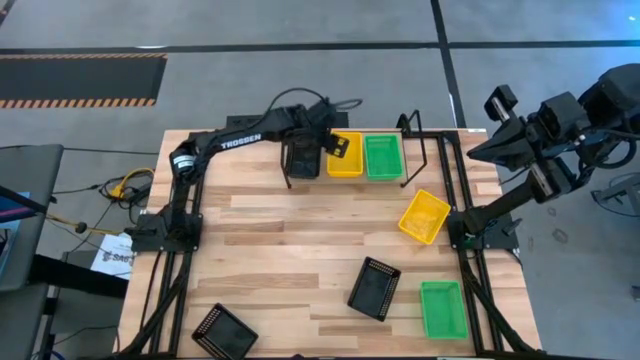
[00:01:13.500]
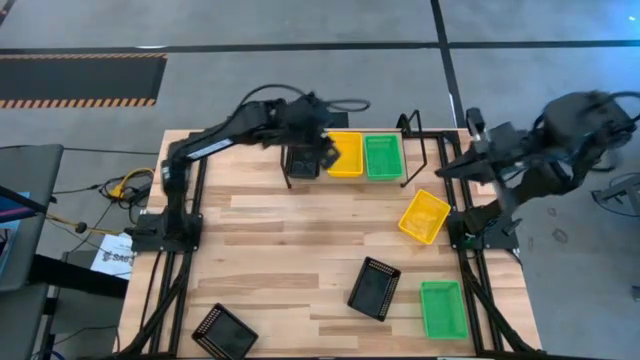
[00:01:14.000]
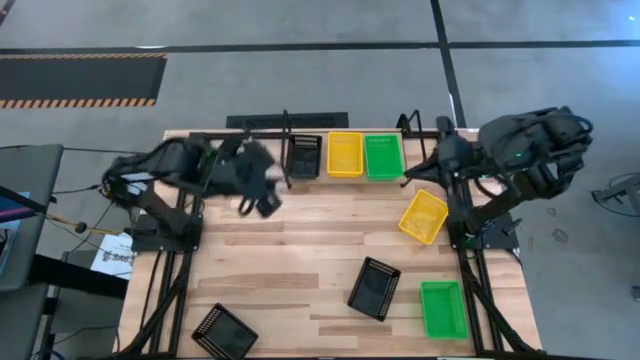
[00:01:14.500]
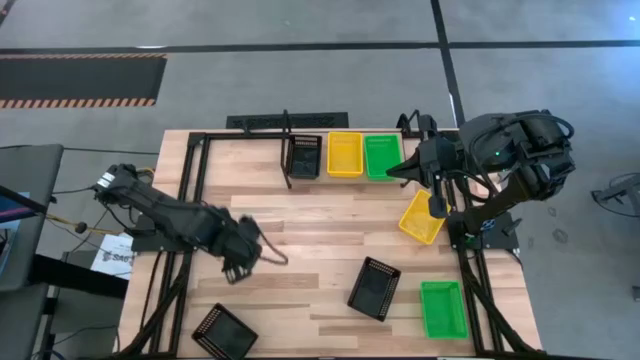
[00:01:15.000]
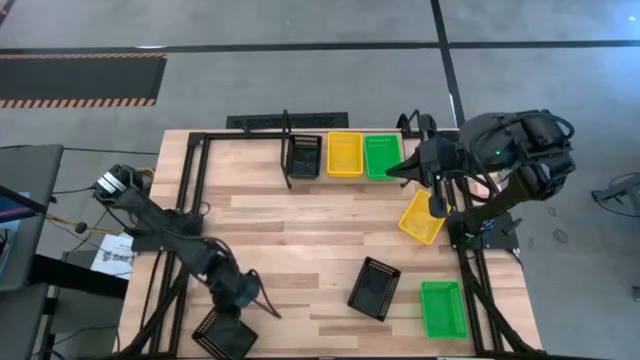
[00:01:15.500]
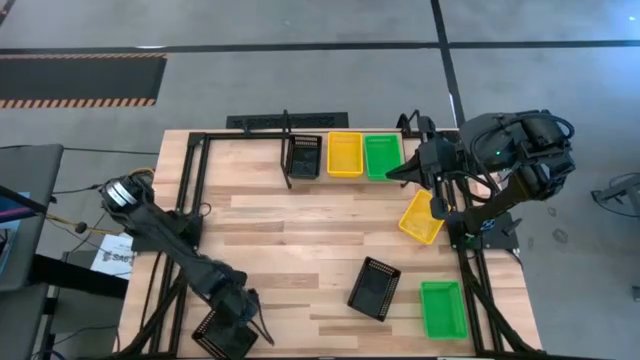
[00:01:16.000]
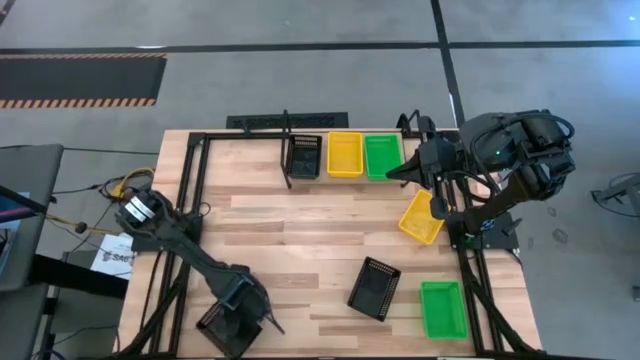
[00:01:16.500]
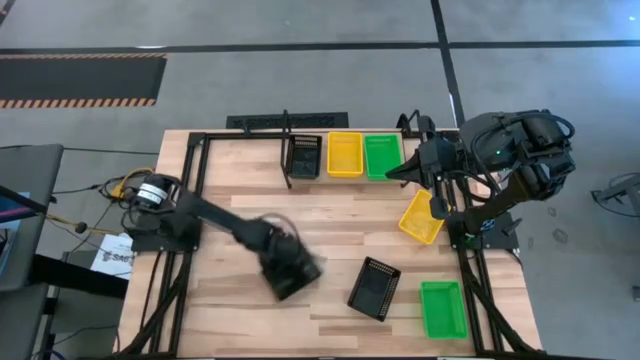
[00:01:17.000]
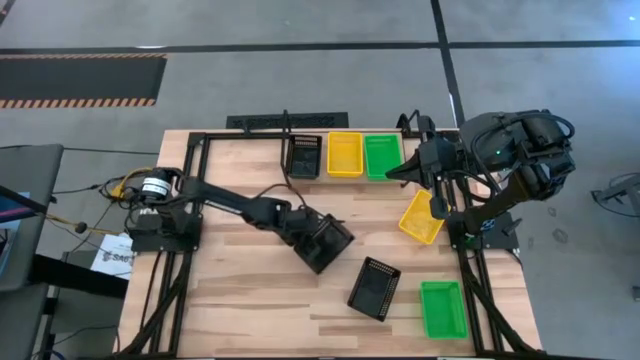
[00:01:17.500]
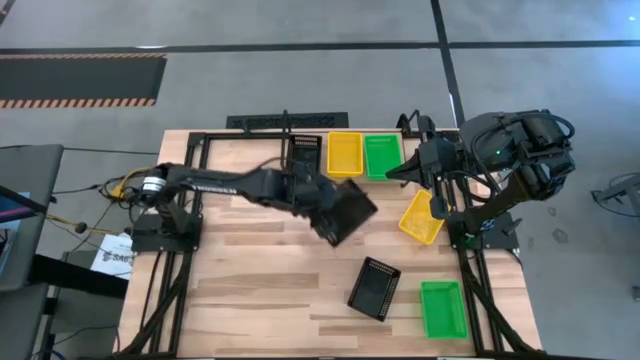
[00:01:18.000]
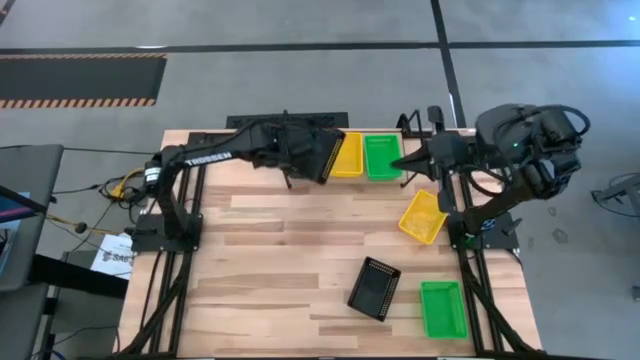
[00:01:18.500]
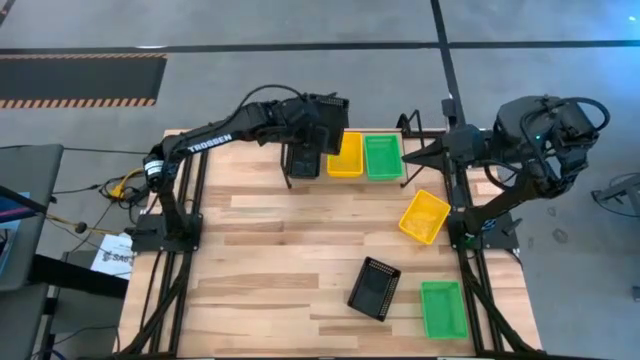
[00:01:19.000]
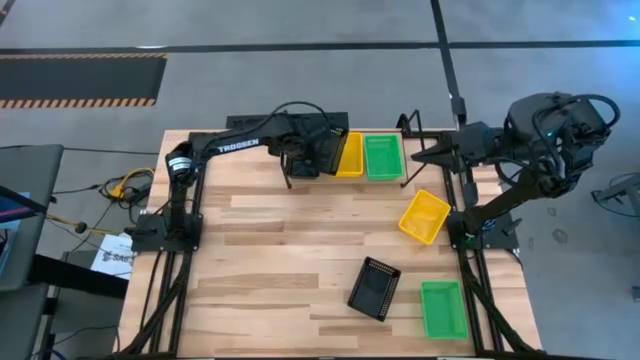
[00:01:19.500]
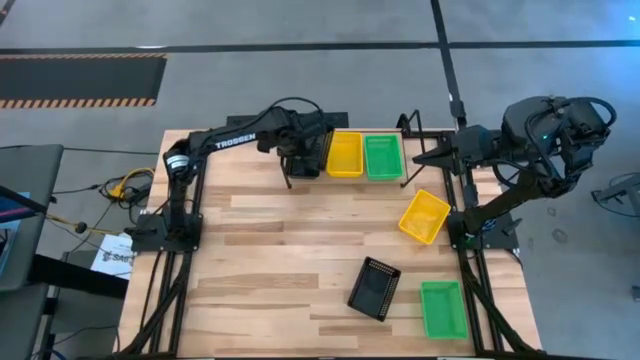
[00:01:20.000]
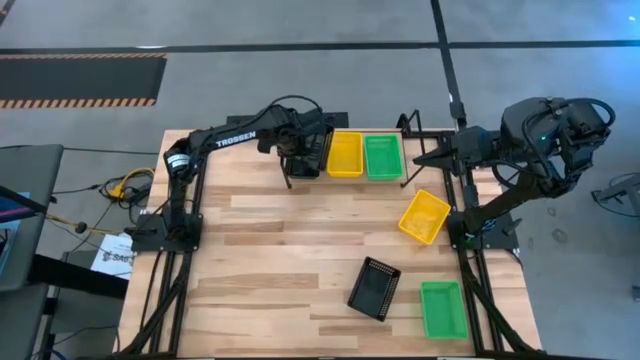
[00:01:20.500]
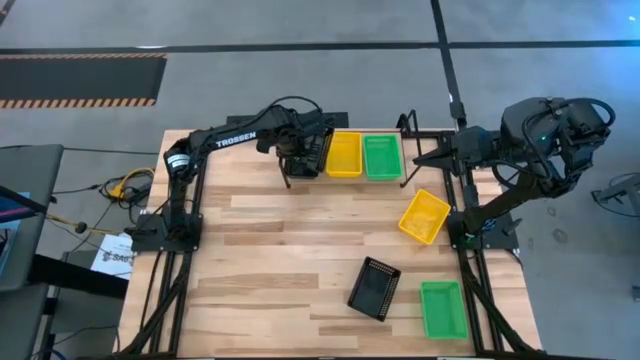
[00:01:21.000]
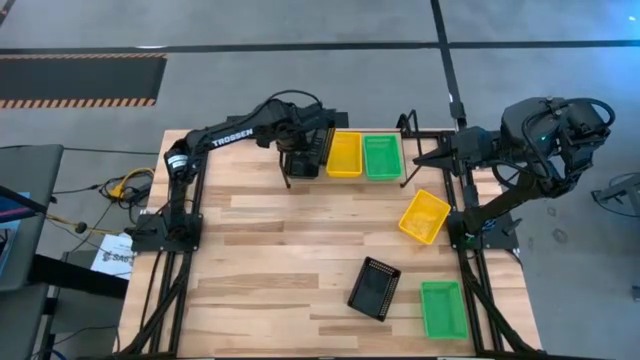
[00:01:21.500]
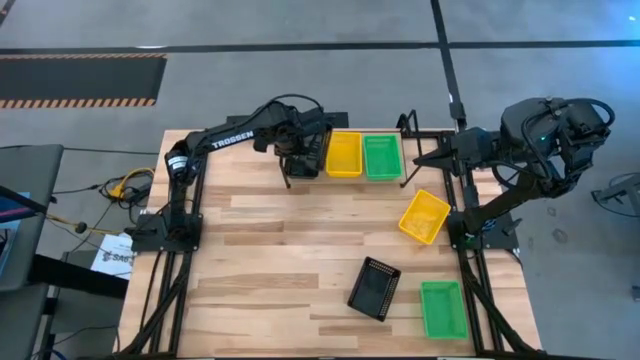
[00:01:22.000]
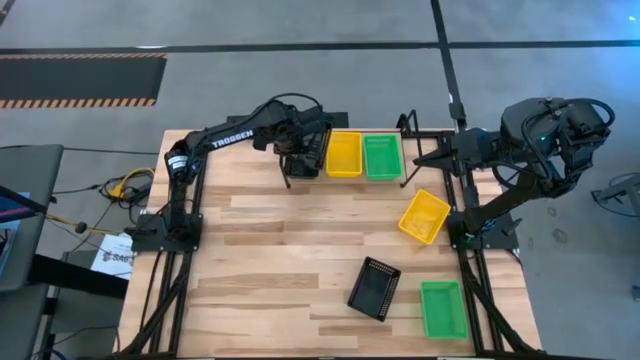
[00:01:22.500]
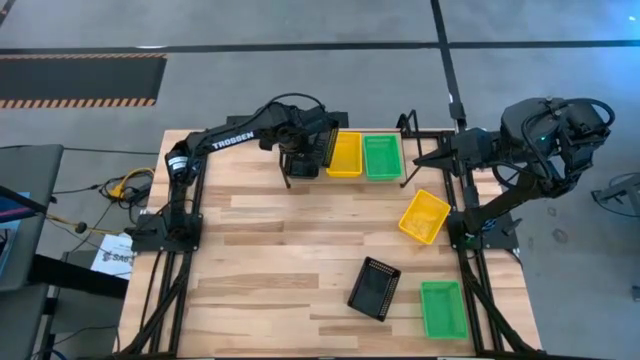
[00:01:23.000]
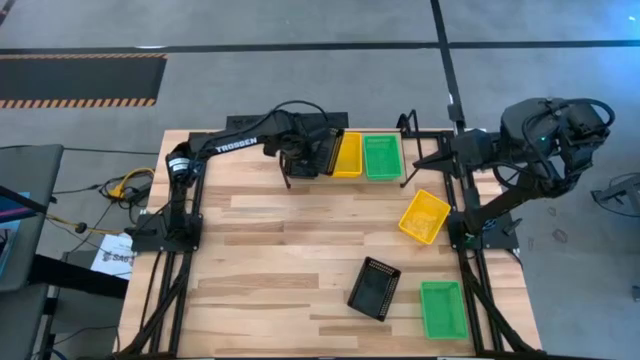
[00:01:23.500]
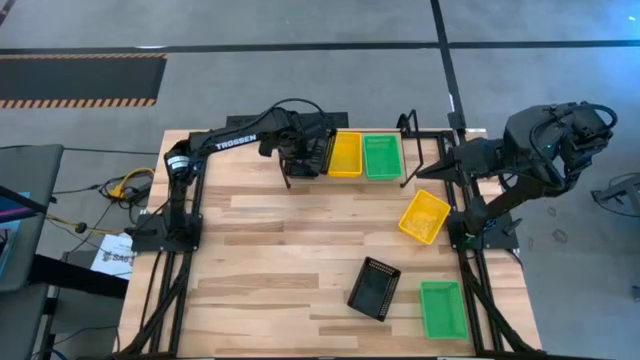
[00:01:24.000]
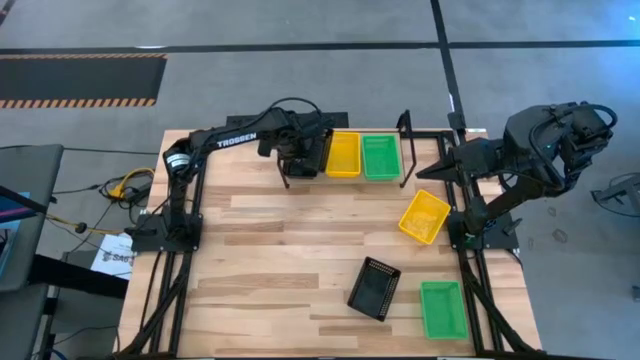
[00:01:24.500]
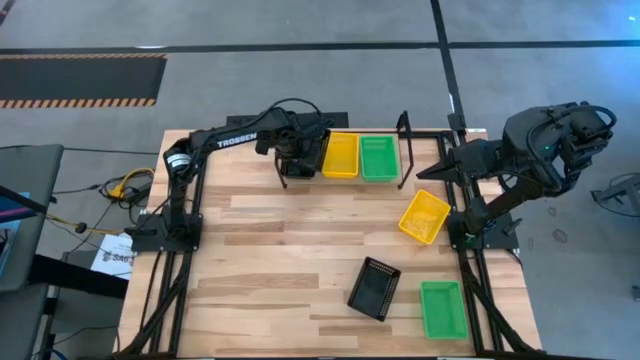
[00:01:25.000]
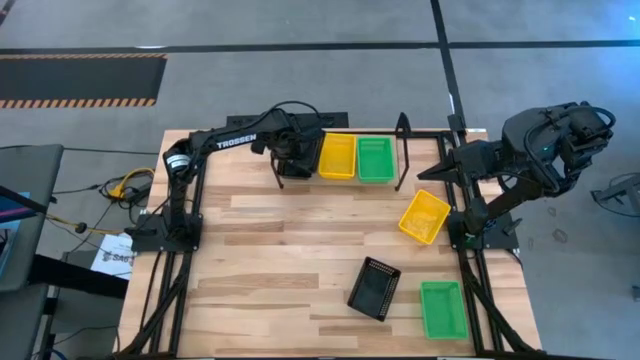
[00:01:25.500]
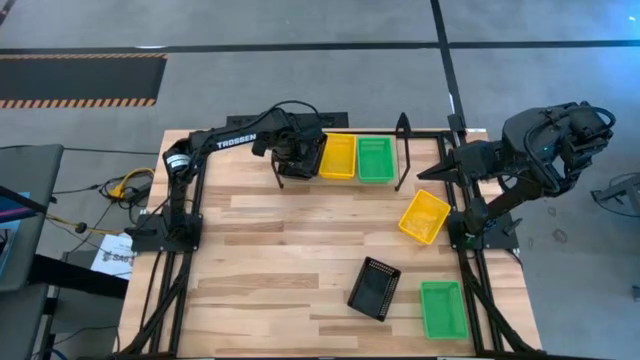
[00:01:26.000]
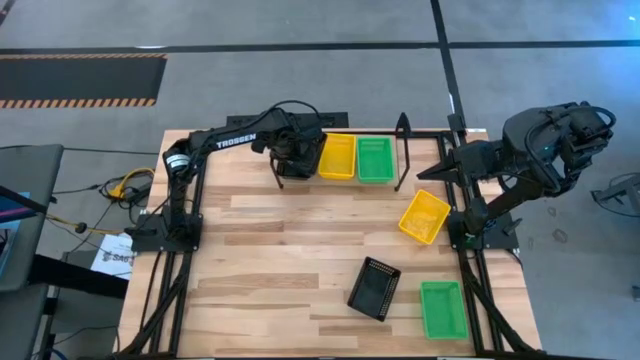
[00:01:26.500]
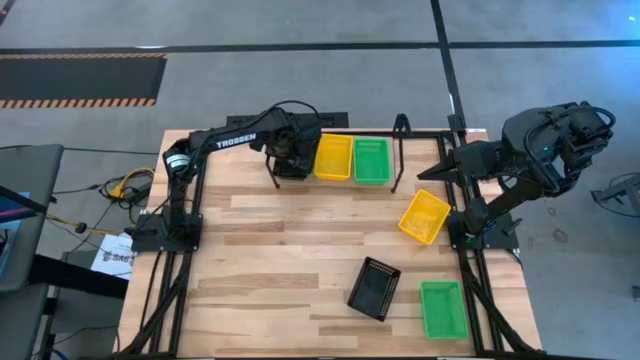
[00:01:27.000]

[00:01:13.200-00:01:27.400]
Task: Stack baskets on shelf by color
Stack the left black bin on top of the black bin on the shelf

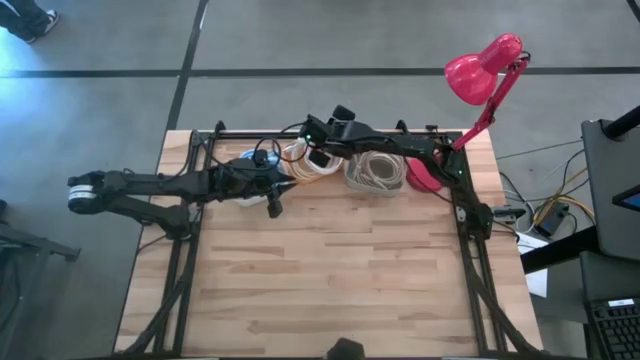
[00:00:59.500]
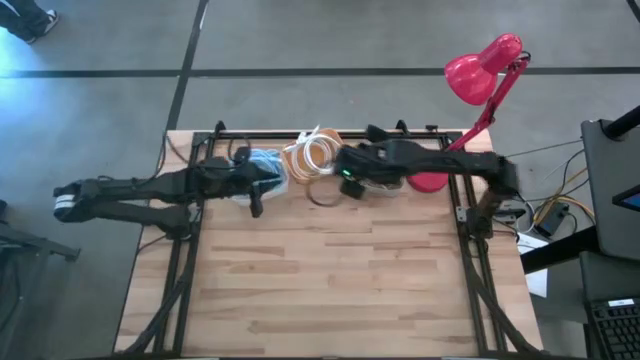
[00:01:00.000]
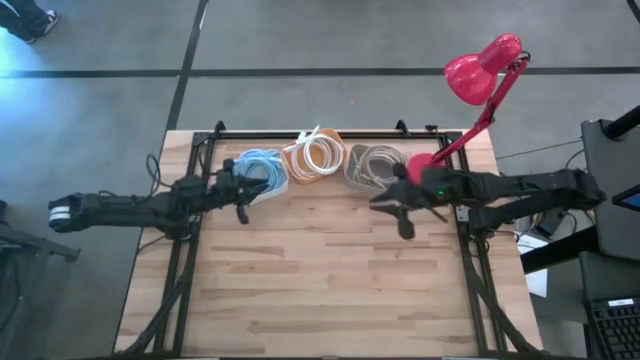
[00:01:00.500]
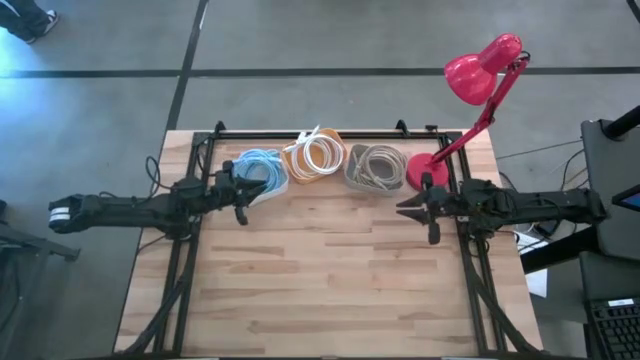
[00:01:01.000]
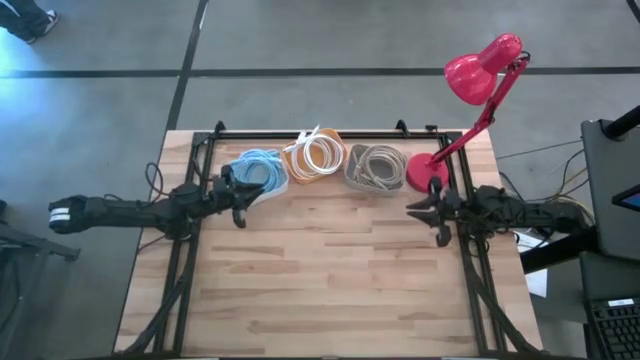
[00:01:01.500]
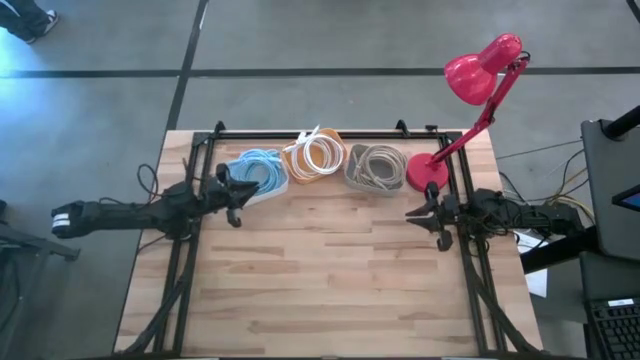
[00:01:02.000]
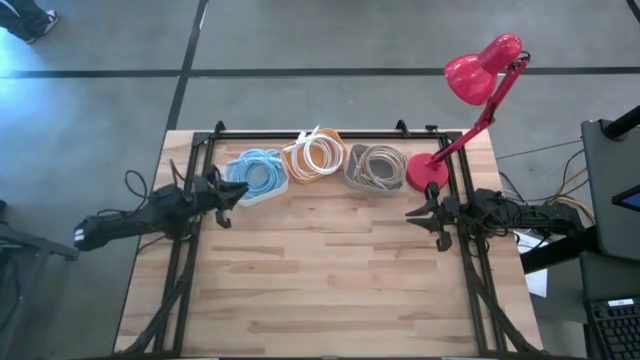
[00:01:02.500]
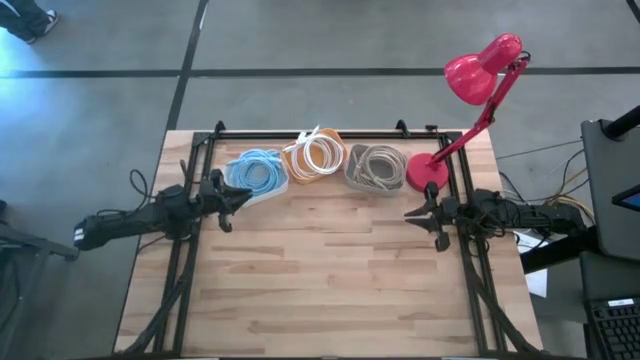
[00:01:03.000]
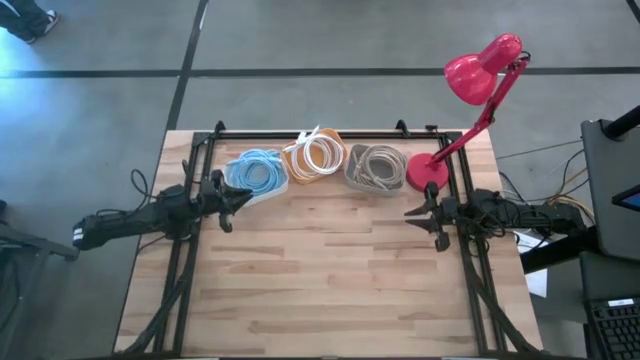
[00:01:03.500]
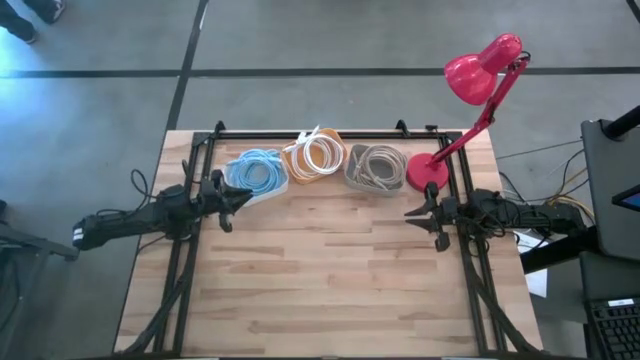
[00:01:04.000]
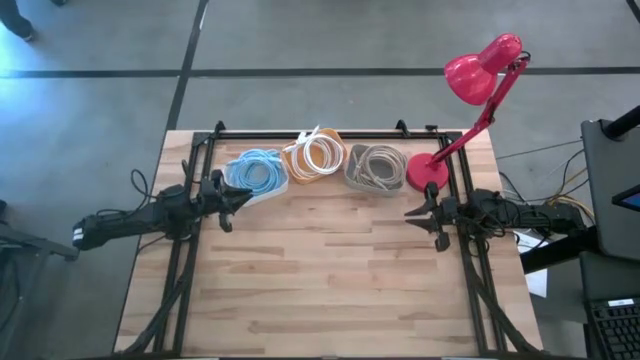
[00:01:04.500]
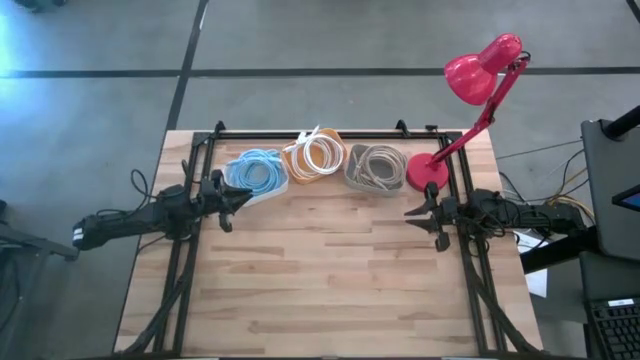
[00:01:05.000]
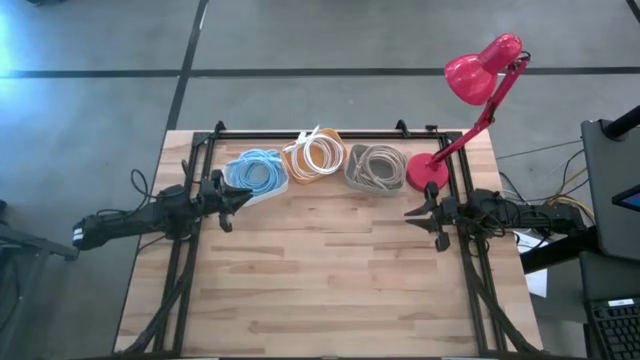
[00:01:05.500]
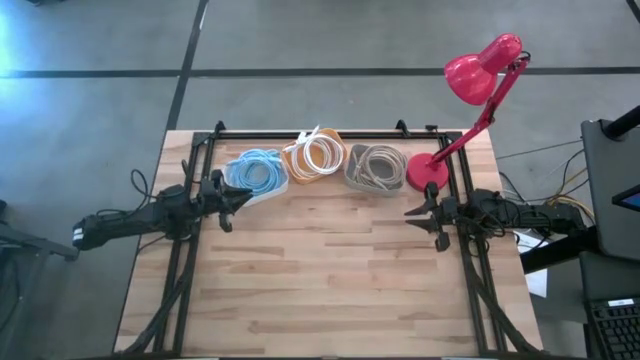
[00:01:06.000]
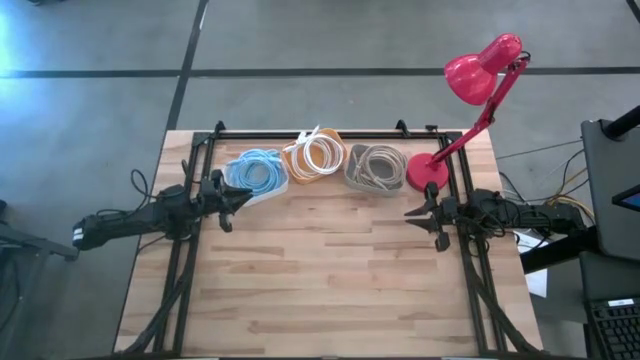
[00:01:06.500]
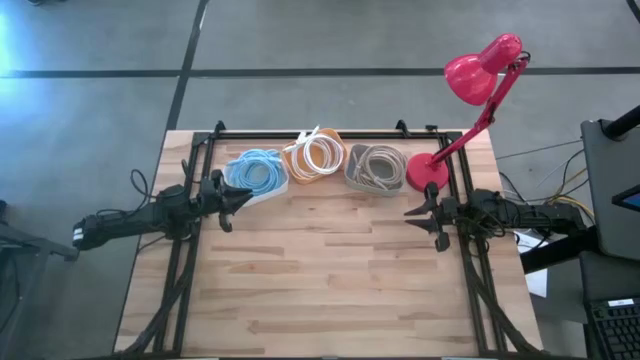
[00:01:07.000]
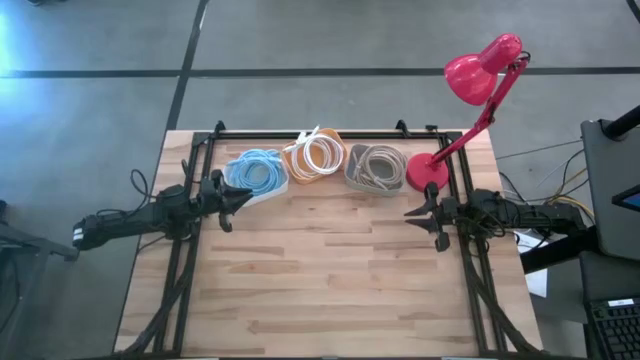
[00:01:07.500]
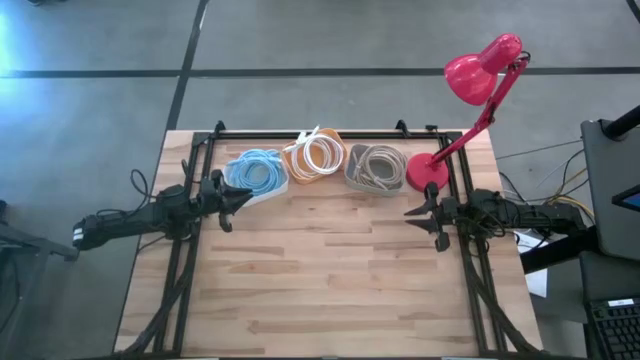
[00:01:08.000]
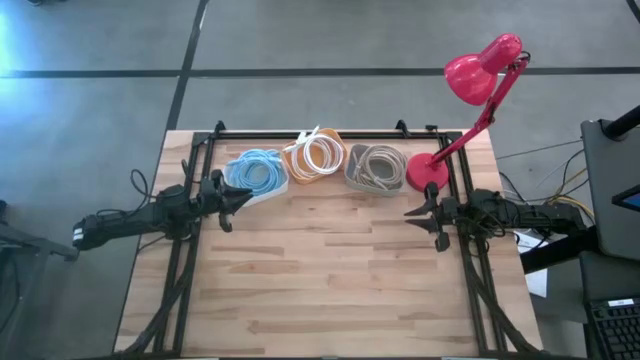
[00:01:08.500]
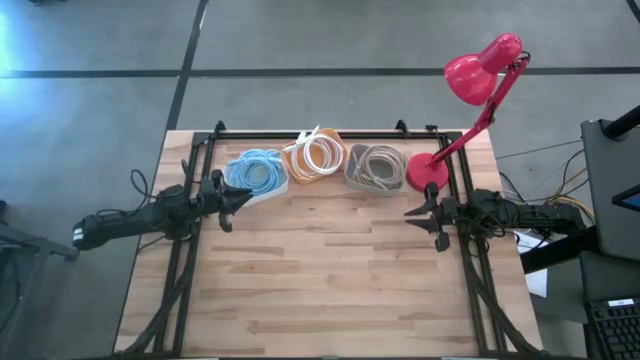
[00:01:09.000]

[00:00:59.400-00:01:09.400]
Task: Pick & Place USB Port
Return to Home Position
